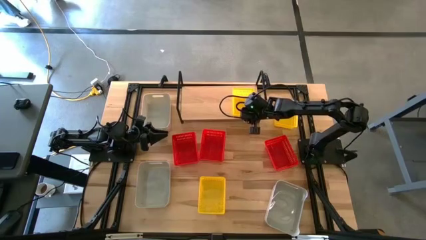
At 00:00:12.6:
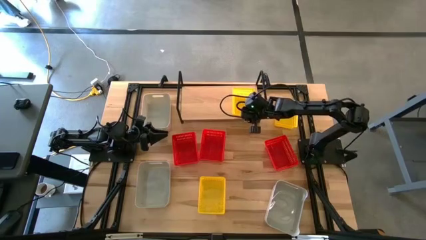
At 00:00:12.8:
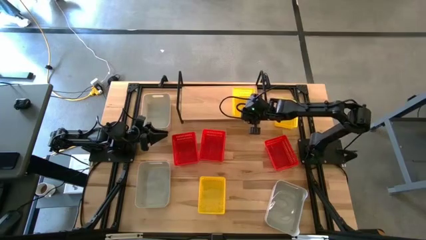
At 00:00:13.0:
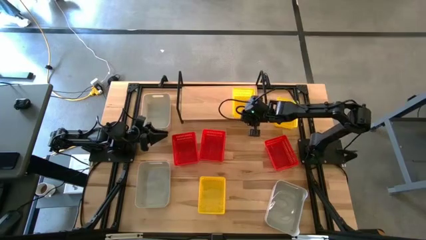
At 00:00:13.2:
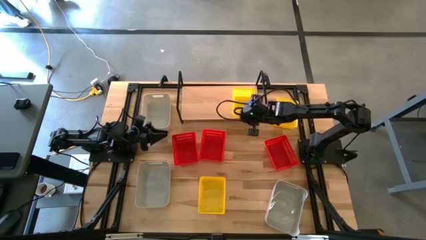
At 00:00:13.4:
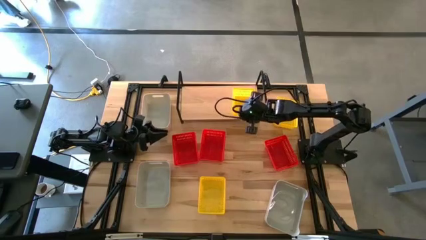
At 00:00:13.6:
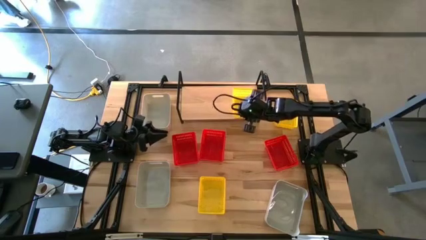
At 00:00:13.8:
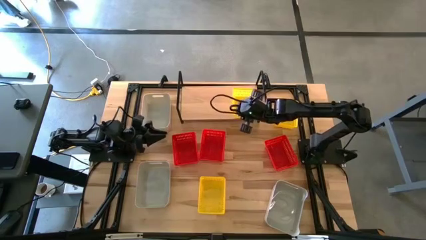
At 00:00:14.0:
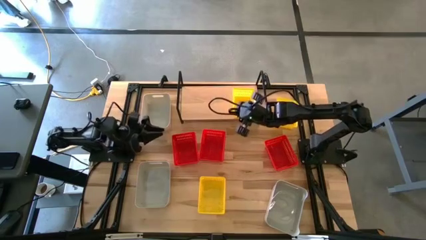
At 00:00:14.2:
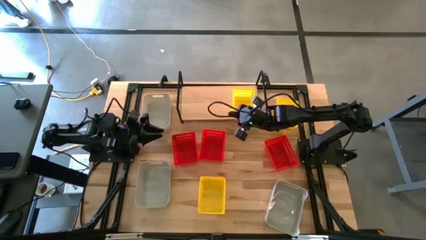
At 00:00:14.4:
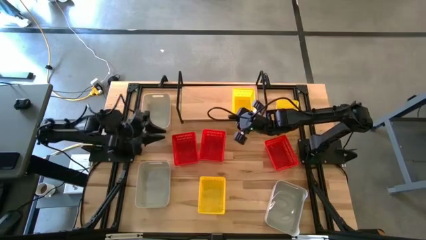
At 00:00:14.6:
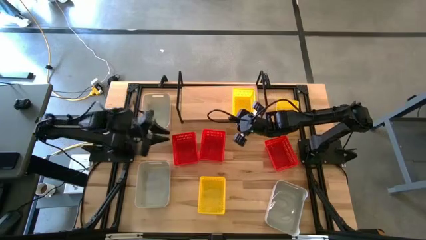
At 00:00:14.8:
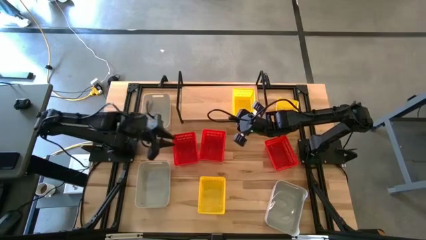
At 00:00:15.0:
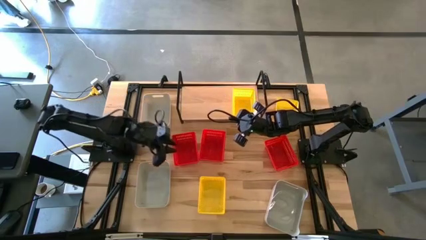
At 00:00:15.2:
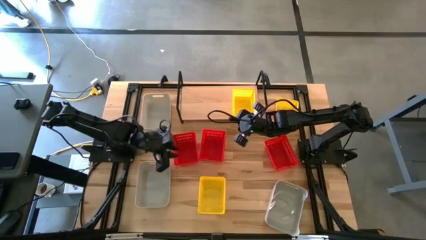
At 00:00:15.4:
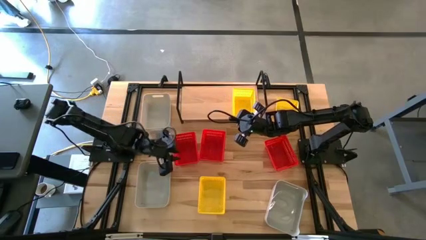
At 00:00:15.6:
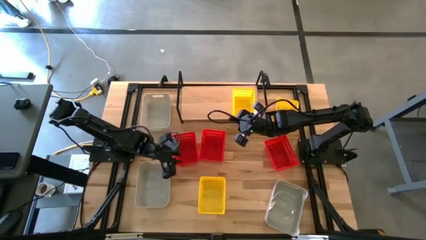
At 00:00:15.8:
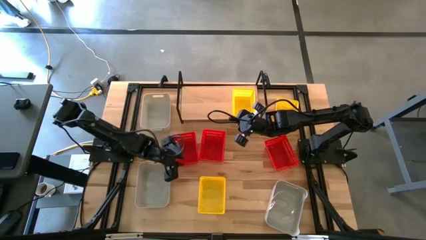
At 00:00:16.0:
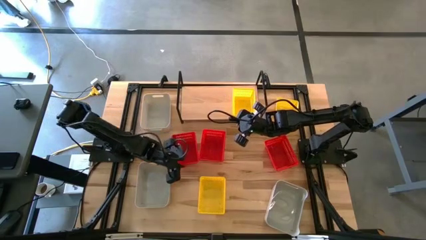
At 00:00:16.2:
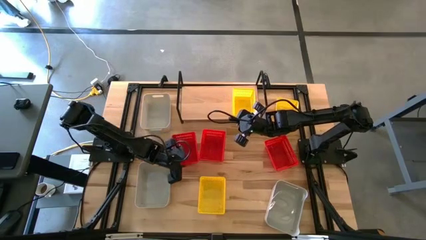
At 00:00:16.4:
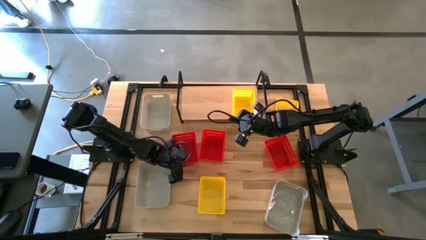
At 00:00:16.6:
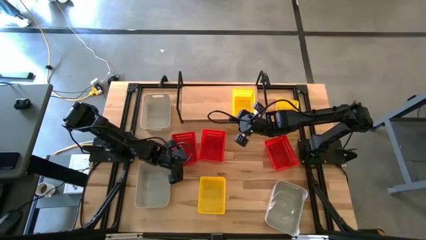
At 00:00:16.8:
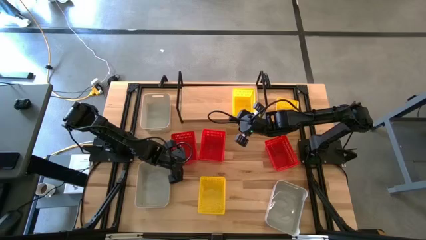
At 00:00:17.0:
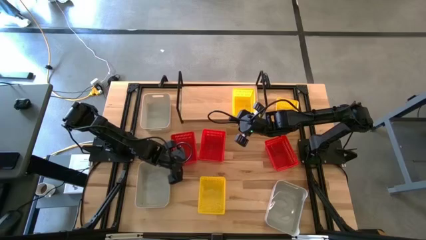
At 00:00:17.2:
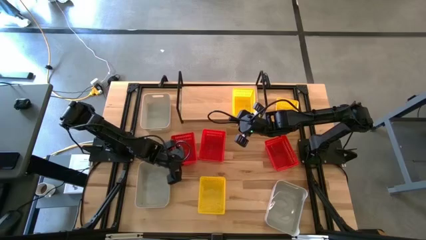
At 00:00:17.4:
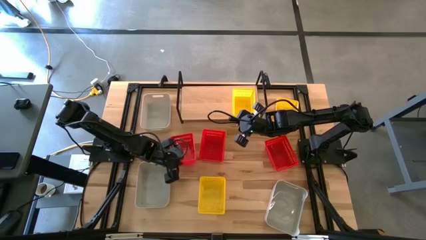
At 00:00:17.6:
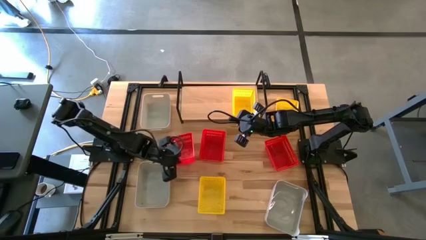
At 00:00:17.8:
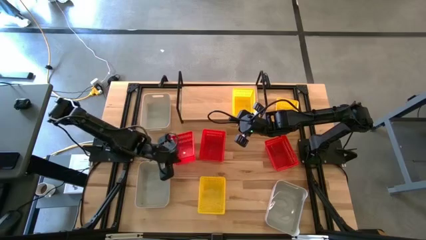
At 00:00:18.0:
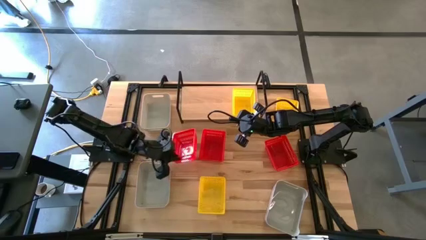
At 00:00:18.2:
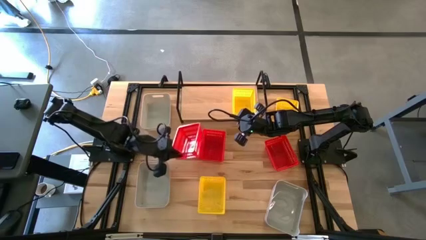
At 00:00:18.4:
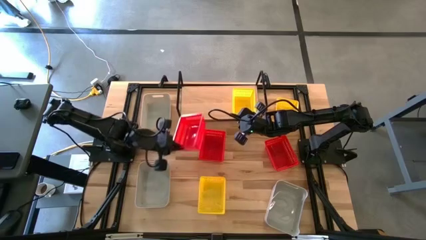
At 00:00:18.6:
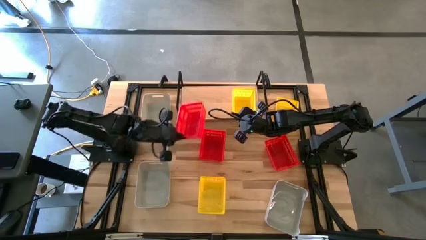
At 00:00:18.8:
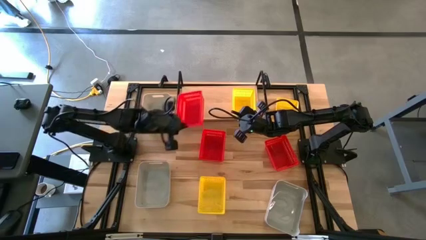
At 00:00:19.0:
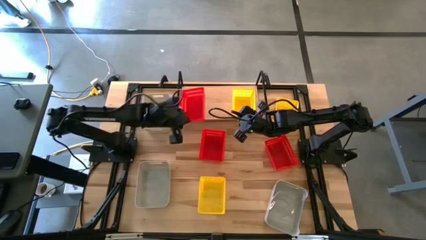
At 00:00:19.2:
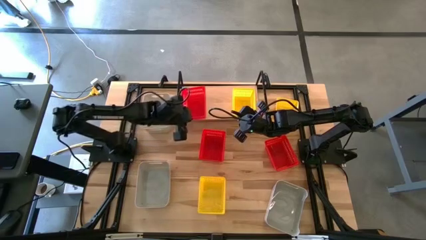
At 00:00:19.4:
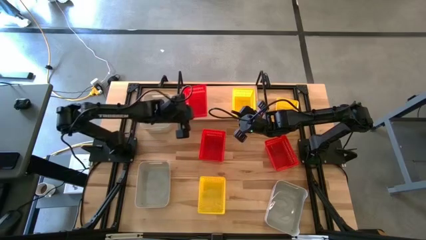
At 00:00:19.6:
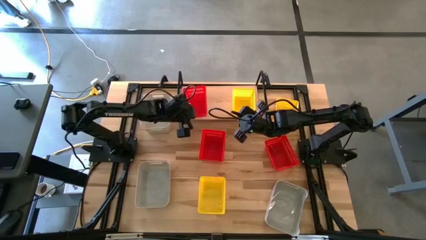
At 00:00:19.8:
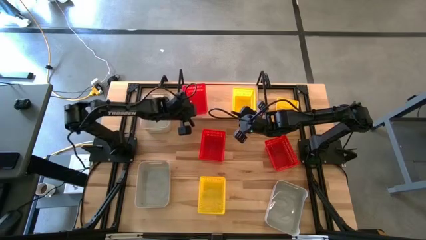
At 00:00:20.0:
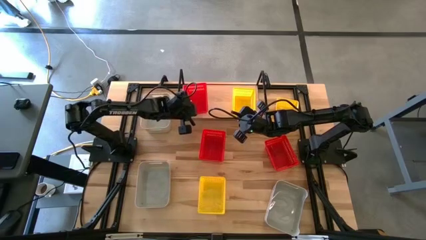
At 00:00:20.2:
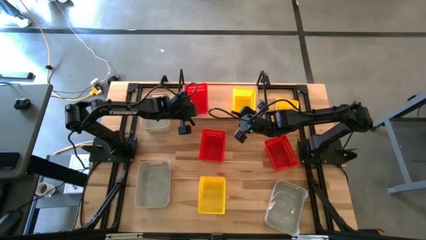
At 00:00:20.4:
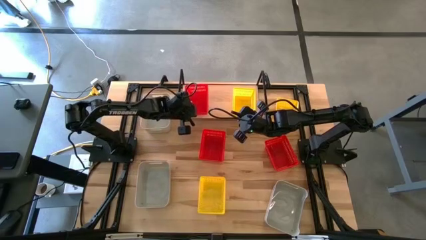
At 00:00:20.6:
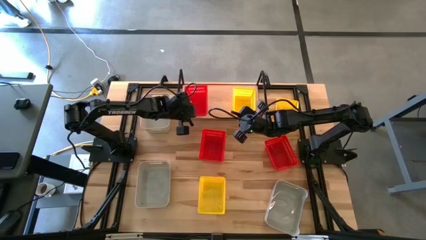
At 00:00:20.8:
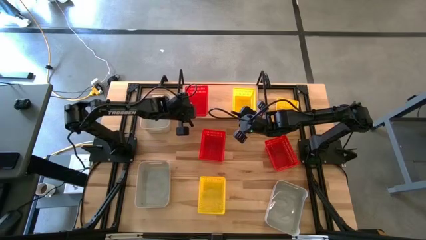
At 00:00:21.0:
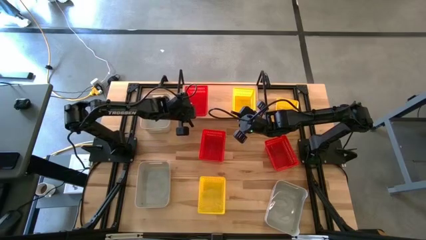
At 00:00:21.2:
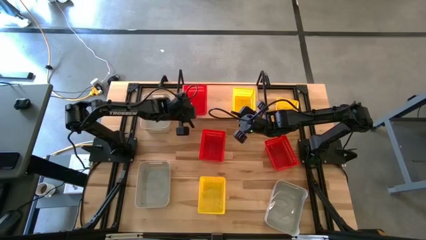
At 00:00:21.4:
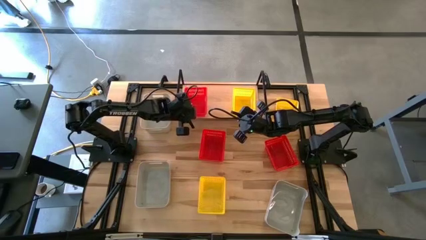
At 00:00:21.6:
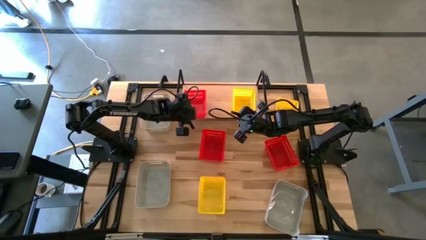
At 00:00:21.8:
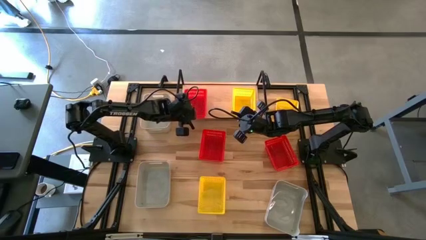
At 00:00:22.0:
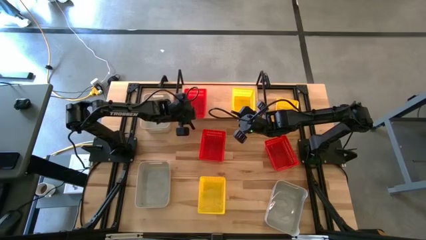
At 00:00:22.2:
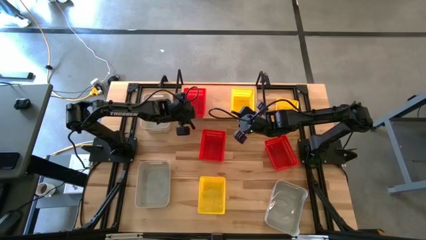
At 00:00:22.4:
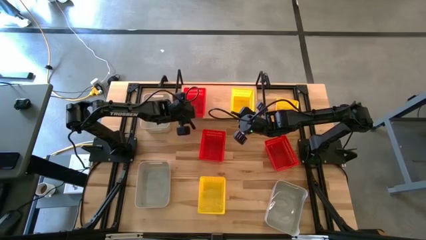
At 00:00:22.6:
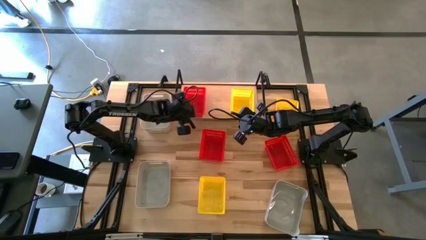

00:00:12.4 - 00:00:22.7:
Task: Stack baskets on shelf by color
Put the left red bin on the shelf
